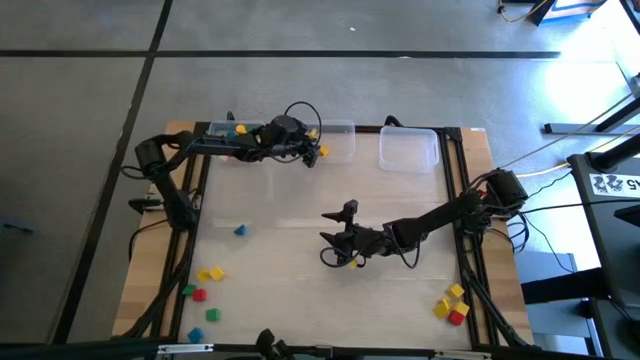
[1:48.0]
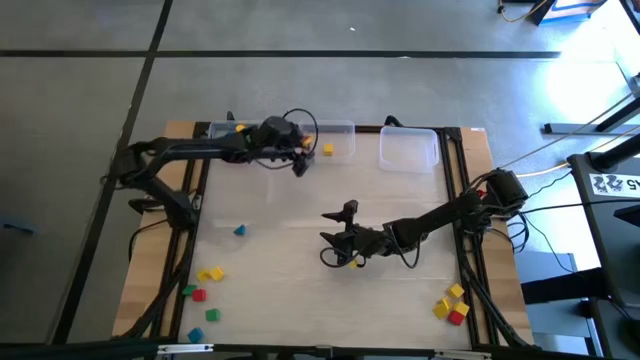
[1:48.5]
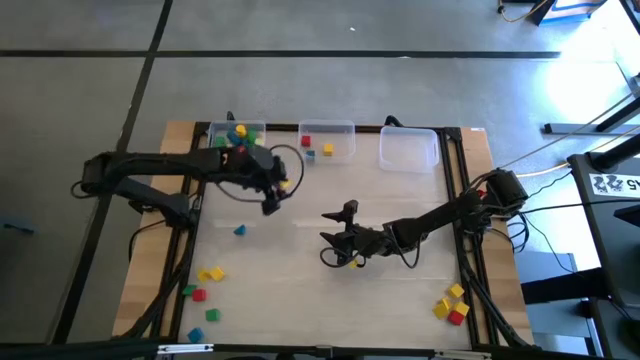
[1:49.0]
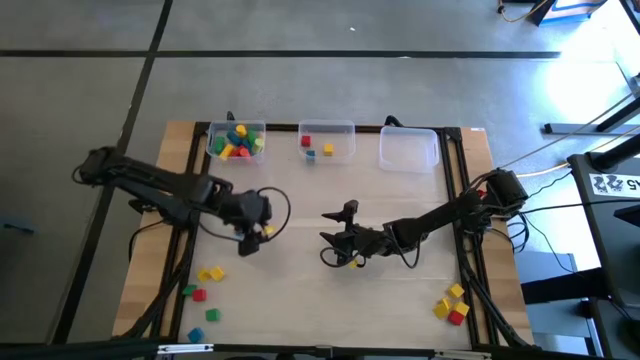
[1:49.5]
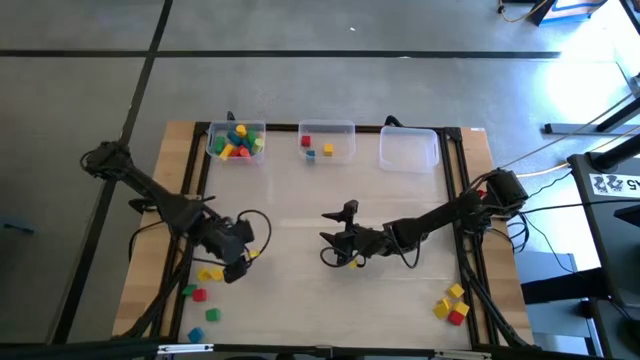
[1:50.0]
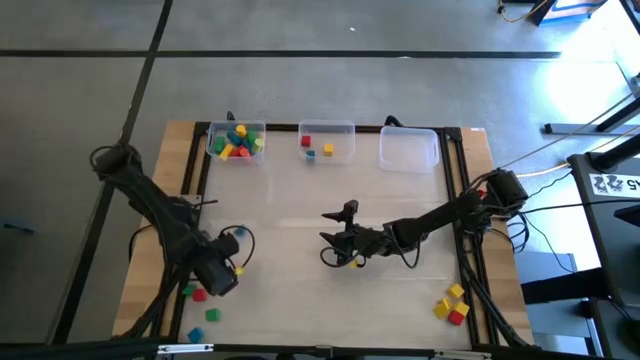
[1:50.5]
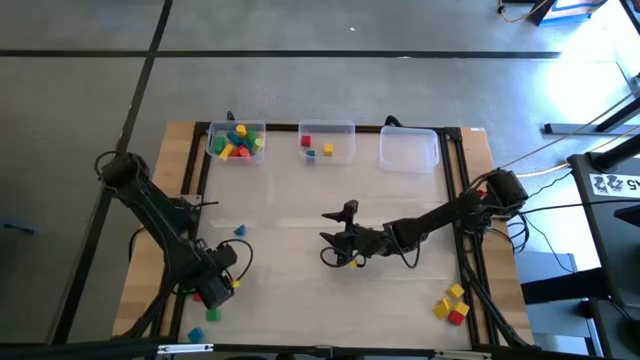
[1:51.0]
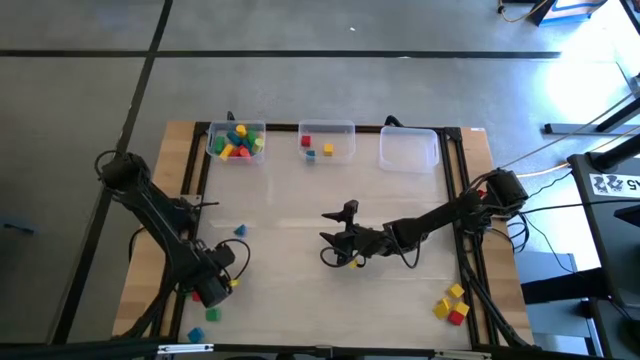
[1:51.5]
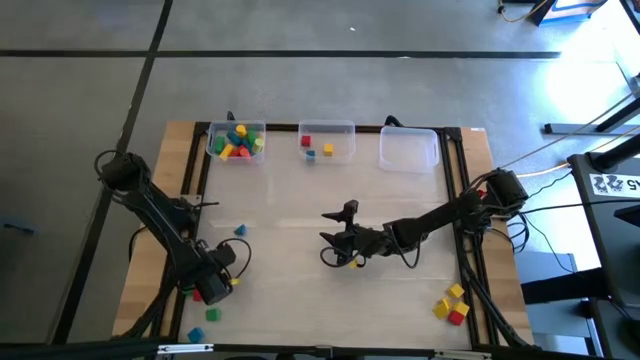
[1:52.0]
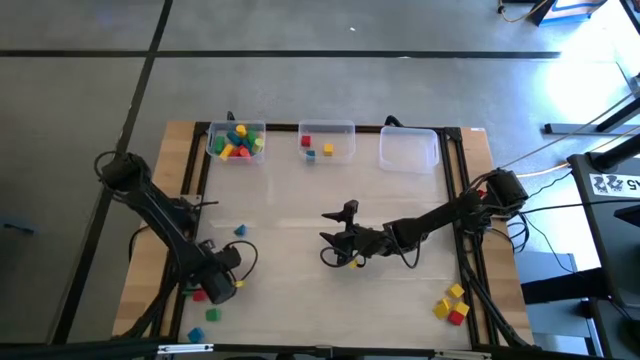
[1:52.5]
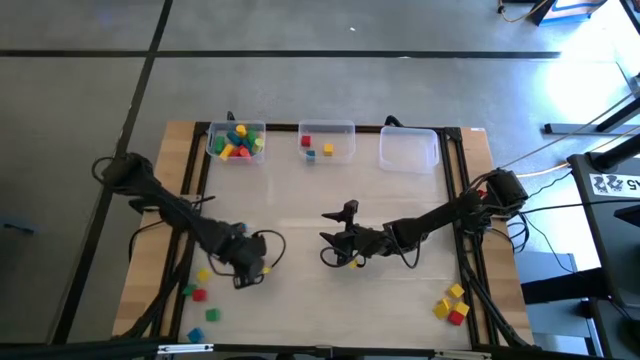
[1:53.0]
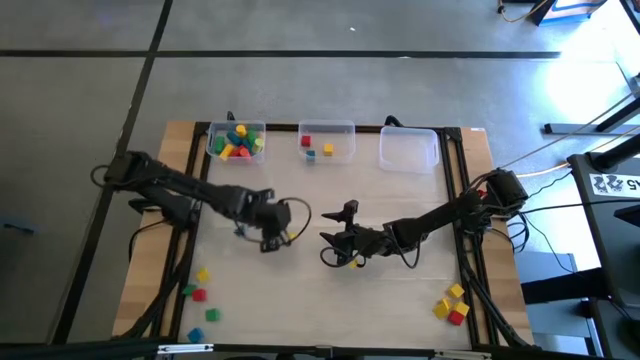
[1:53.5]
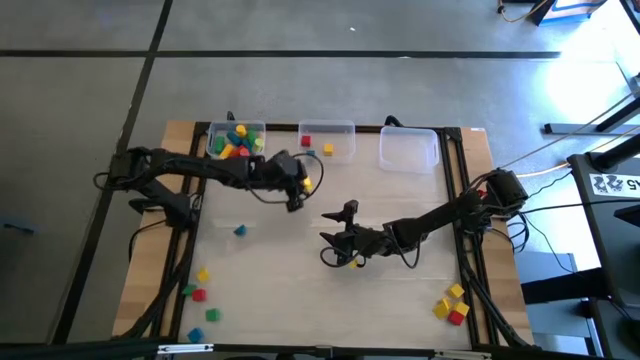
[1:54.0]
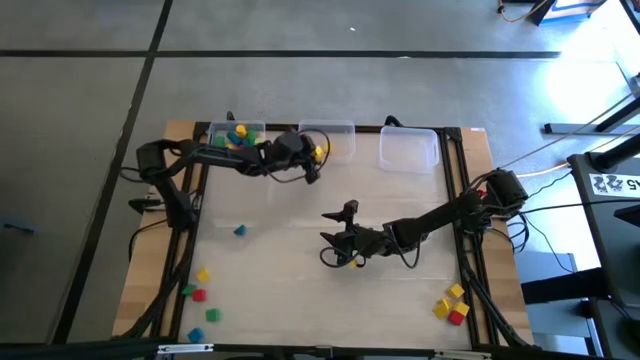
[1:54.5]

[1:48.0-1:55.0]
Task: Sort blocks by size
Put the square yellow block into the middle transparent bin

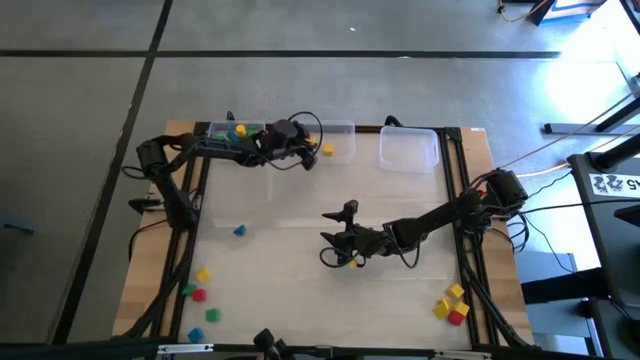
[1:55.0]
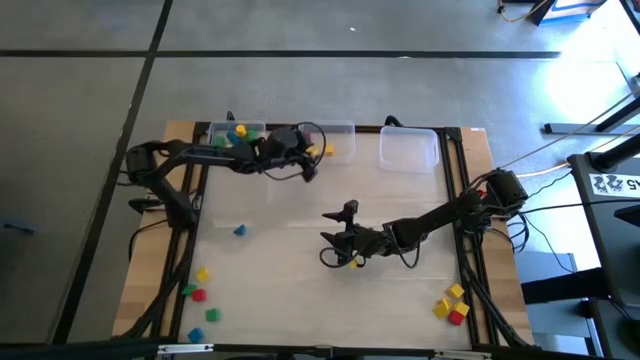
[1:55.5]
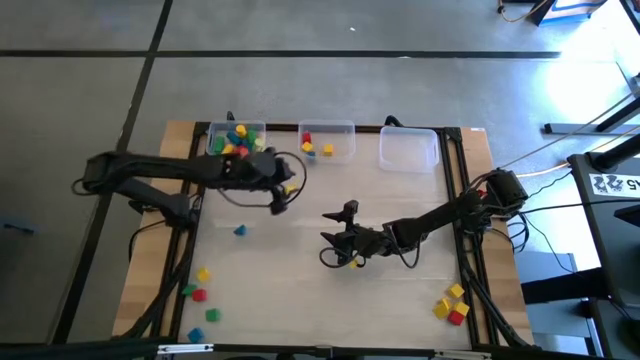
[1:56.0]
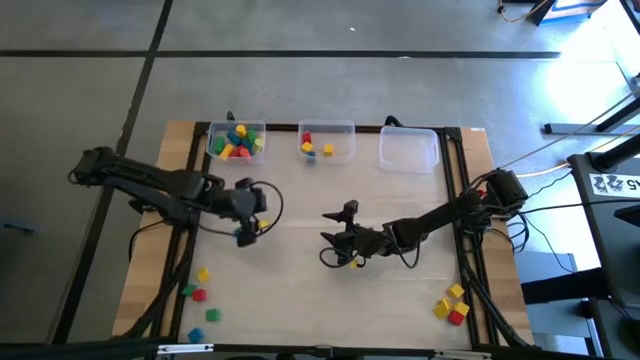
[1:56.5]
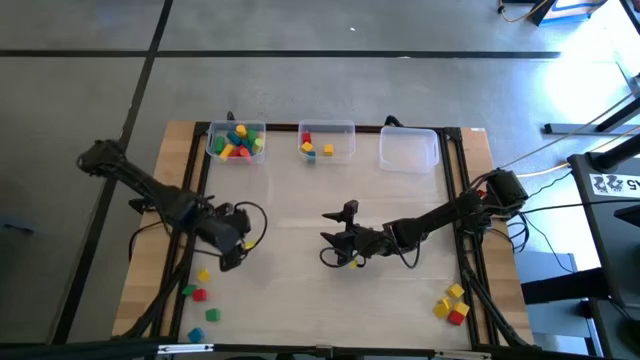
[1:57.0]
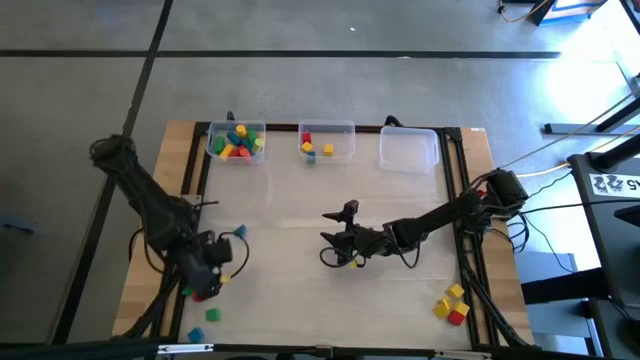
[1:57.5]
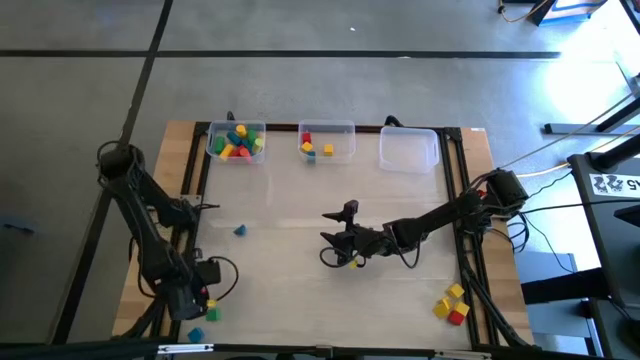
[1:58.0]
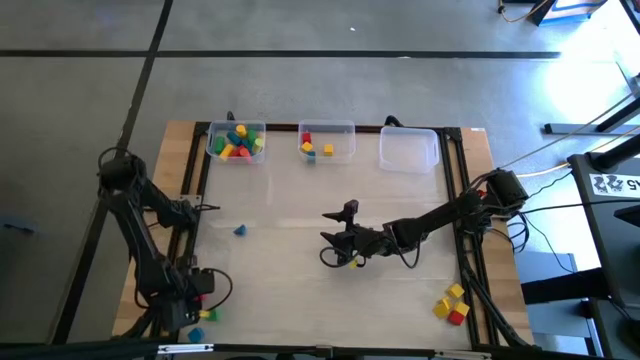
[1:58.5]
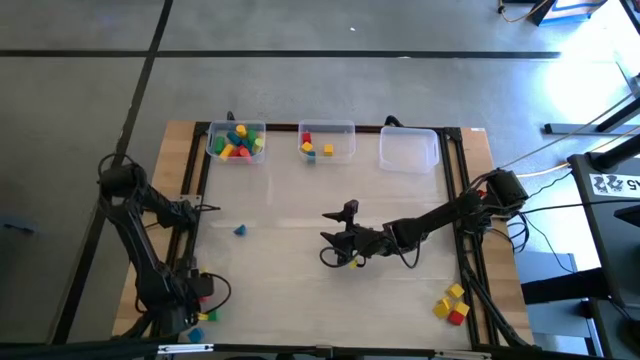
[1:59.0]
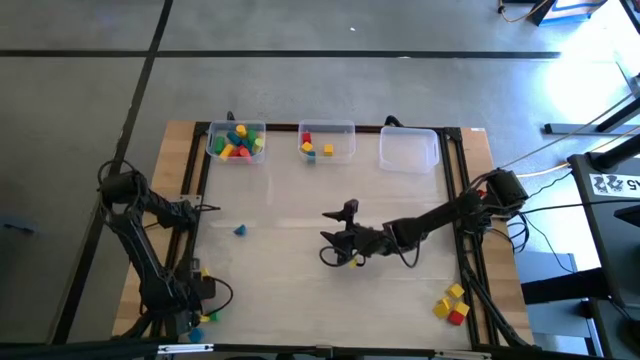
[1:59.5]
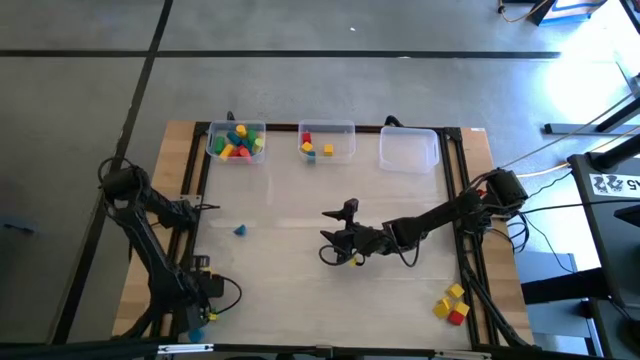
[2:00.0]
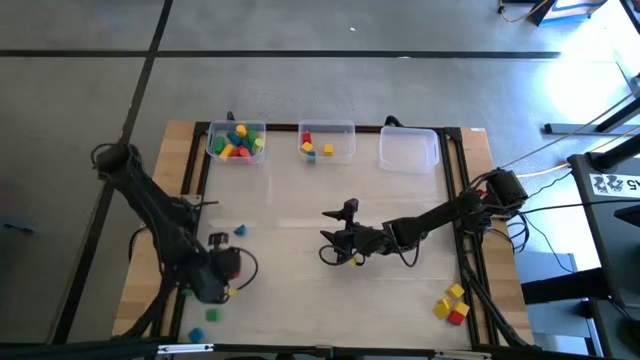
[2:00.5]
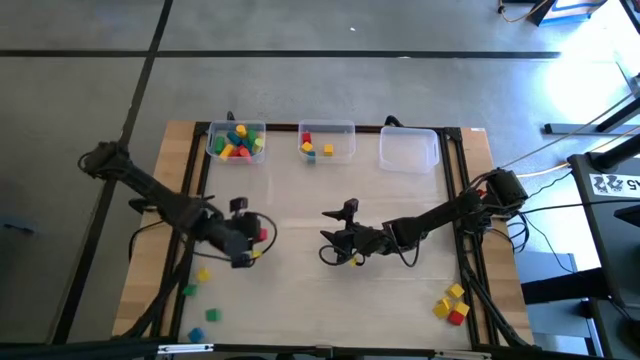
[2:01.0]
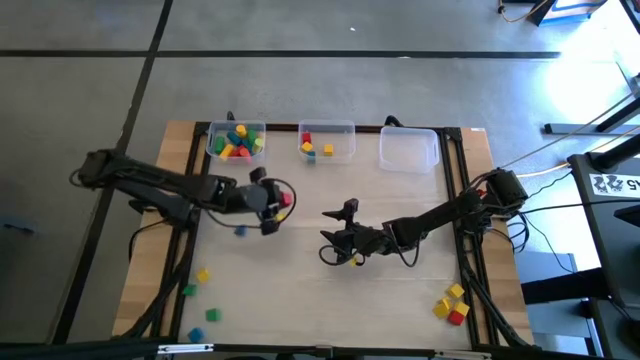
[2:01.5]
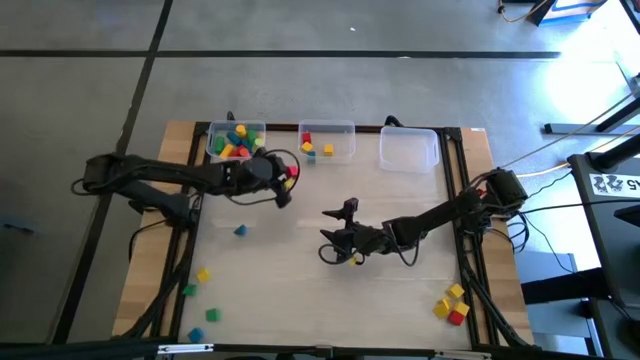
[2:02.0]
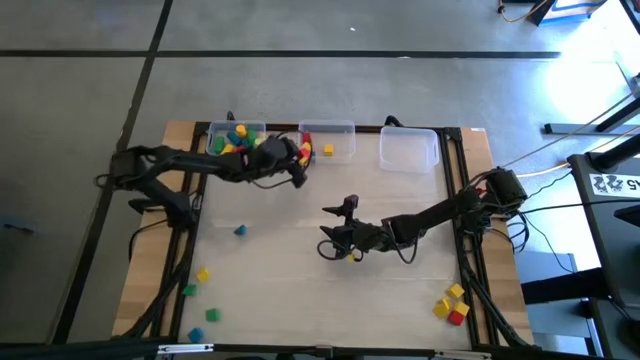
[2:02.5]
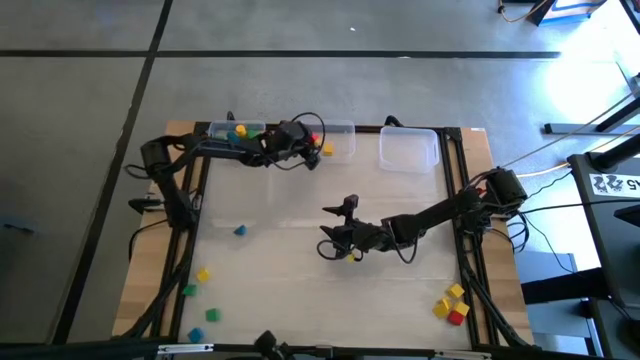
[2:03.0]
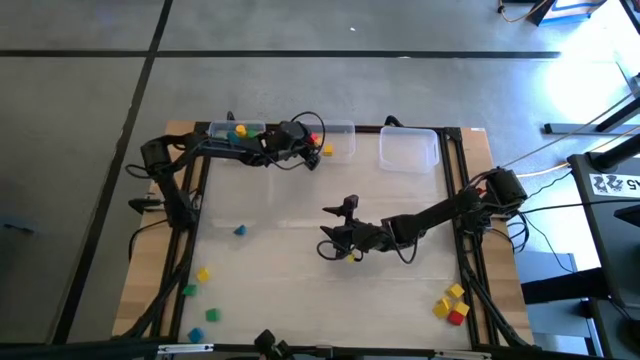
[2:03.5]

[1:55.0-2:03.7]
Put the square red block into the middle transparent bin

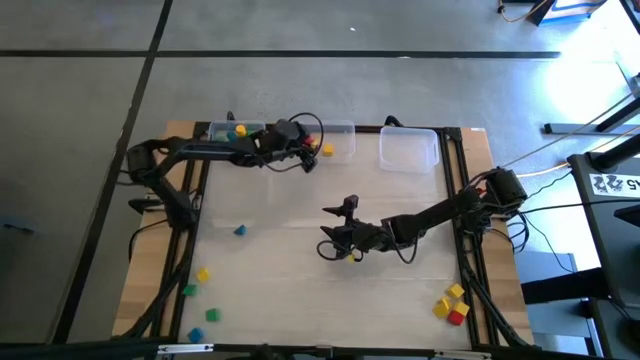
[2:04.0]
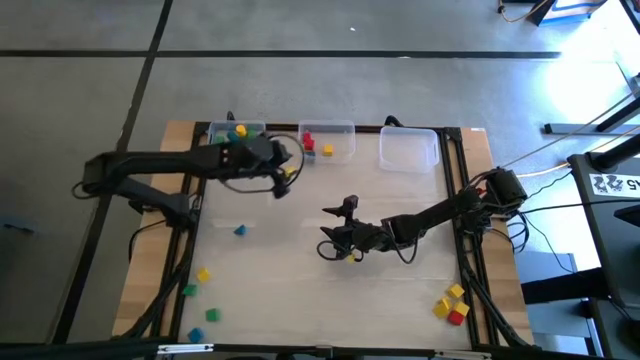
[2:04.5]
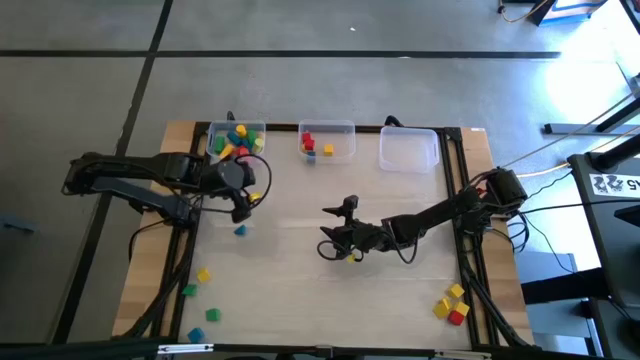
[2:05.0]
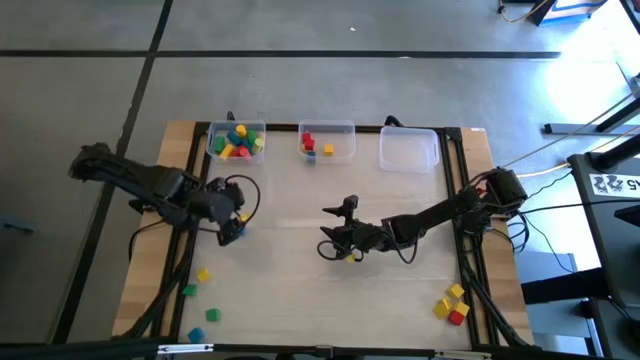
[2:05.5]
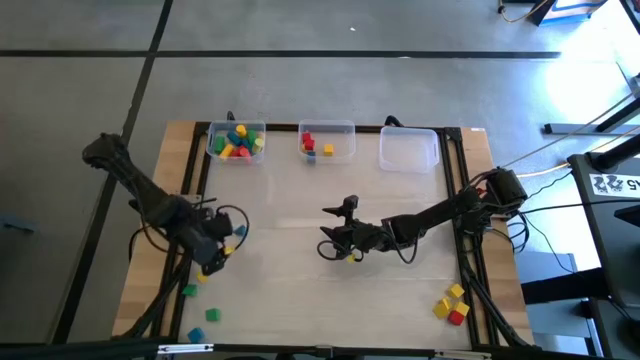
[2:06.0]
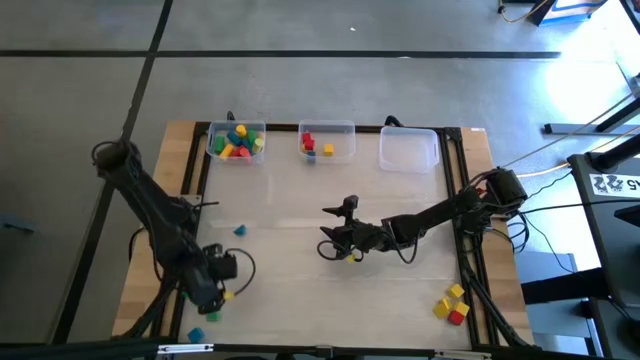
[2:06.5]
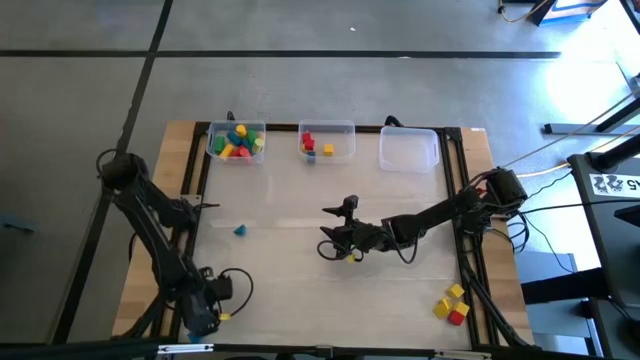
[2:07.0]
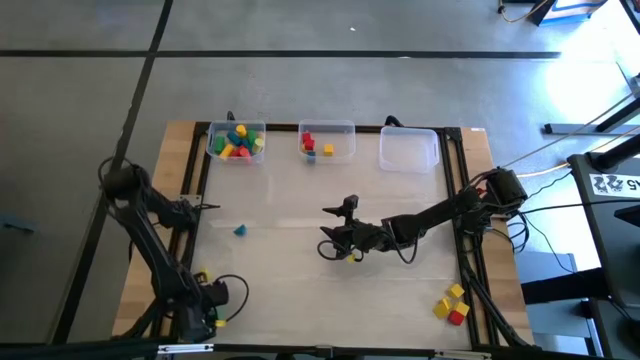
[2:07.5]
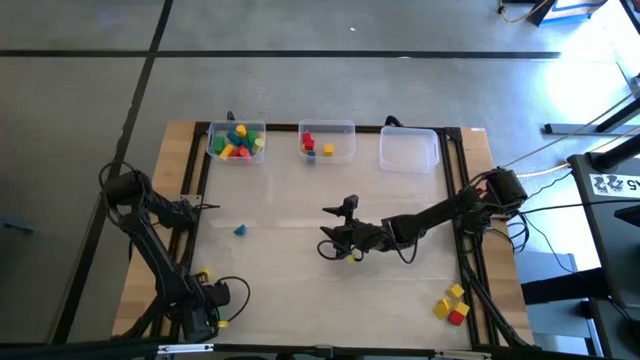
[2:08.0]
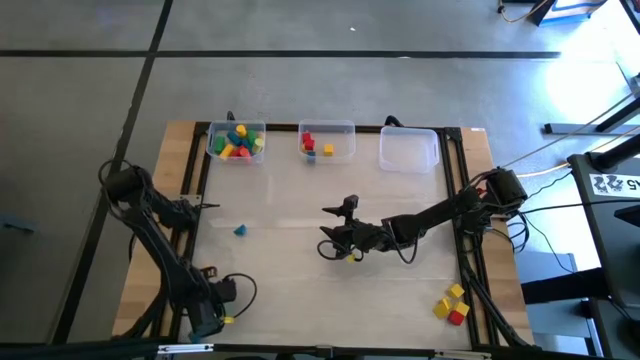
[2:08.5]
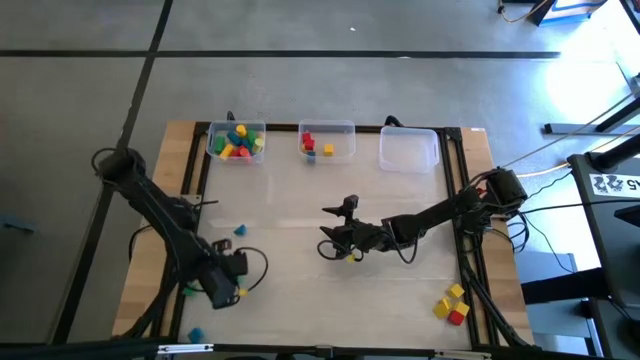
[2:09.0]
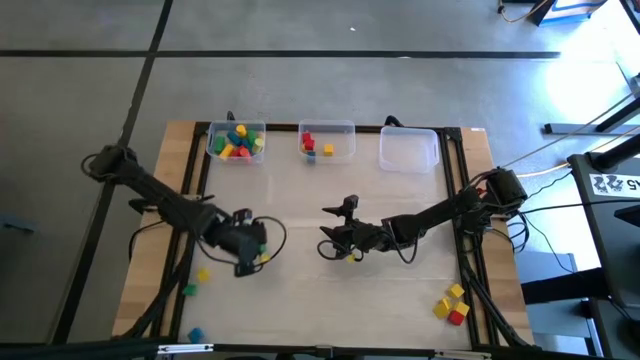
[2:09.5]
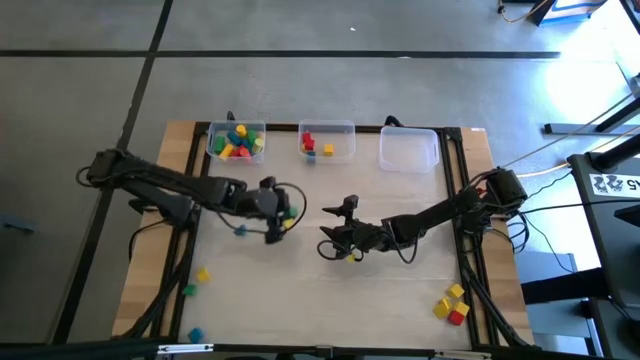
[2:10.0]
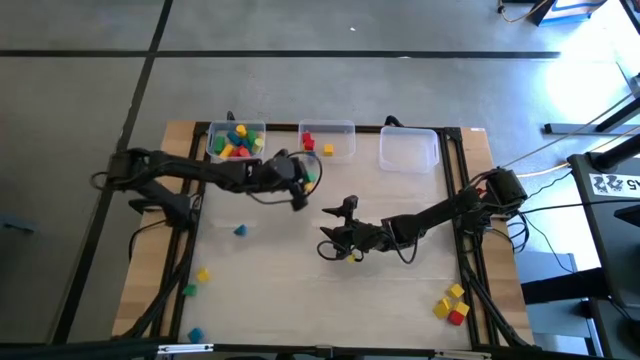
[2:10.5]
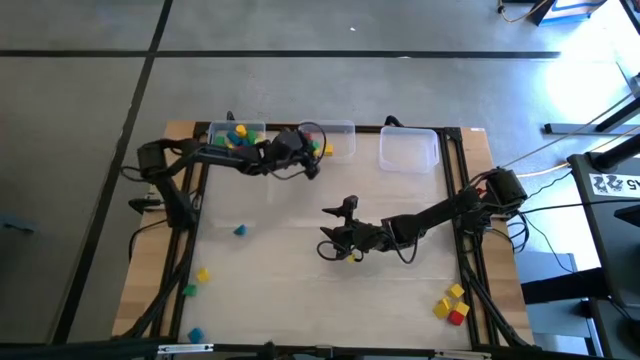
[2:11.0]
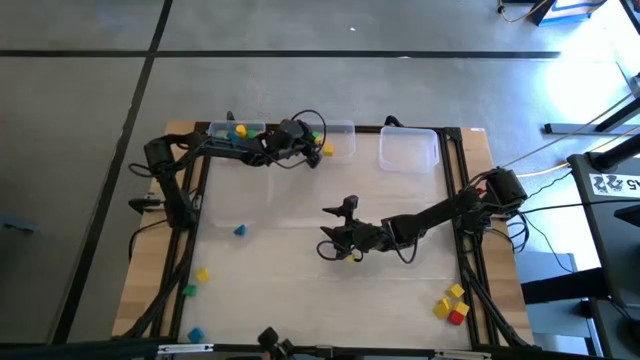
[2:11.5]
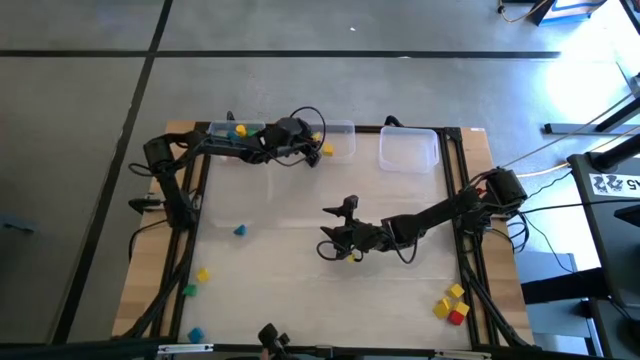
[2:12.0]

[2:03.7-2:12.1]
Put the square green block into the middle transparent bin
